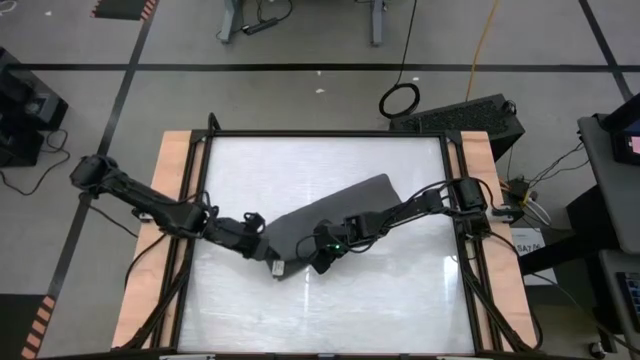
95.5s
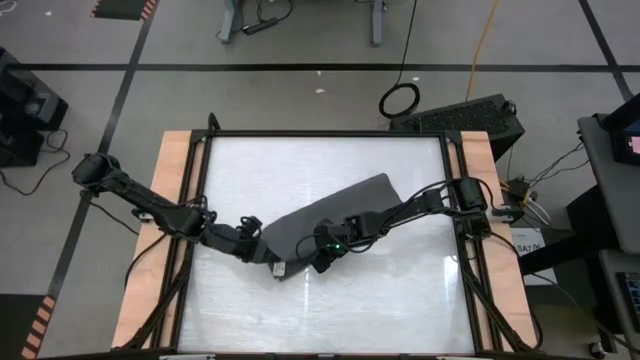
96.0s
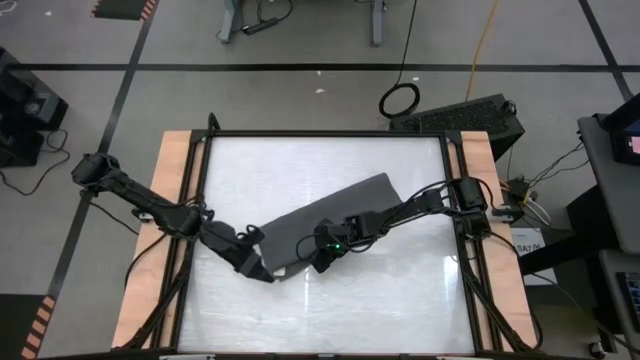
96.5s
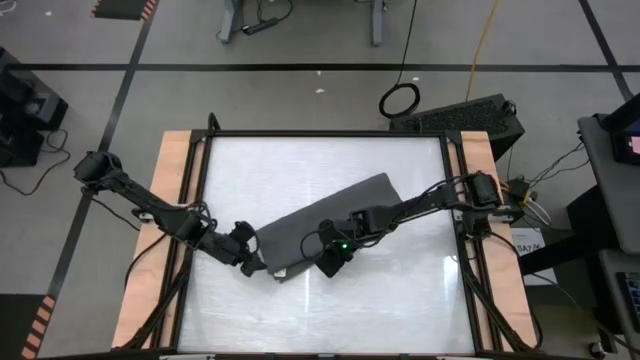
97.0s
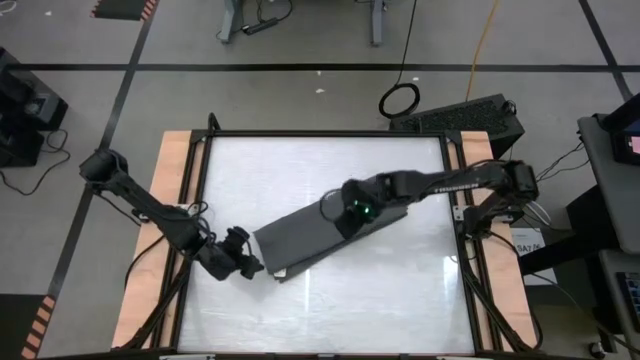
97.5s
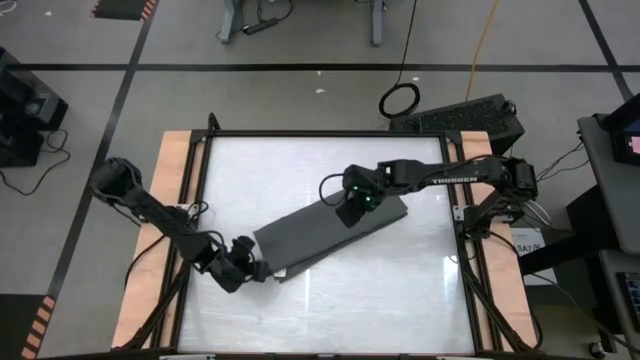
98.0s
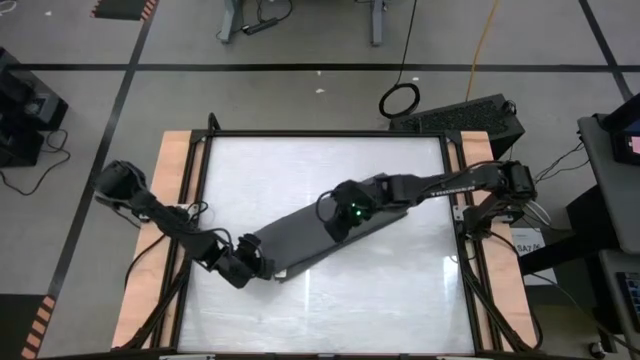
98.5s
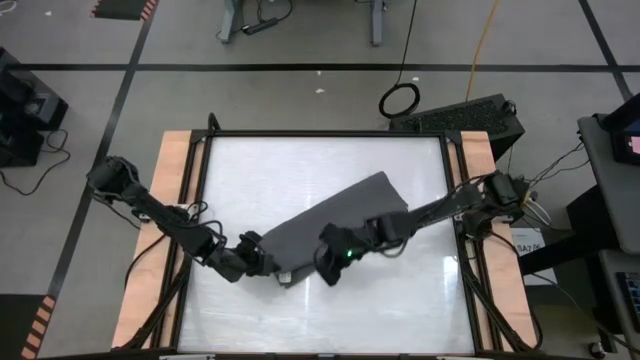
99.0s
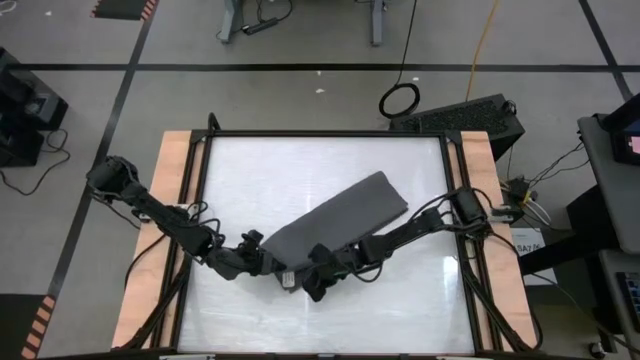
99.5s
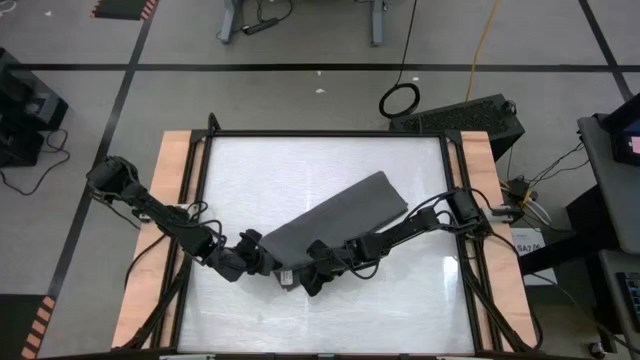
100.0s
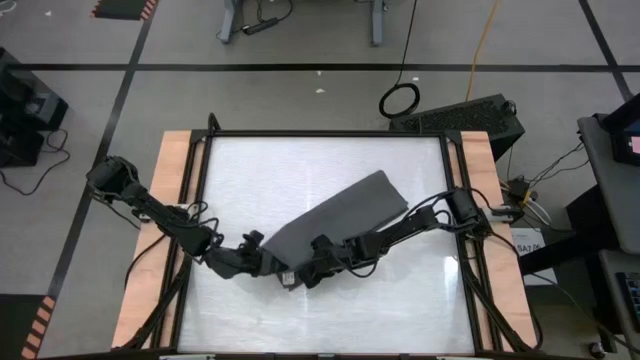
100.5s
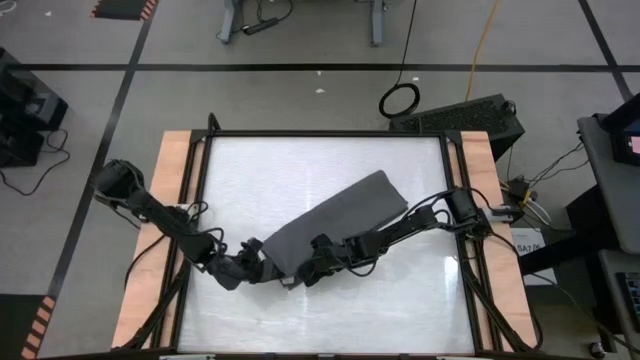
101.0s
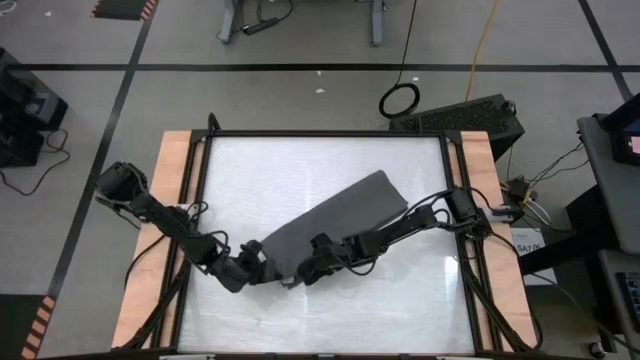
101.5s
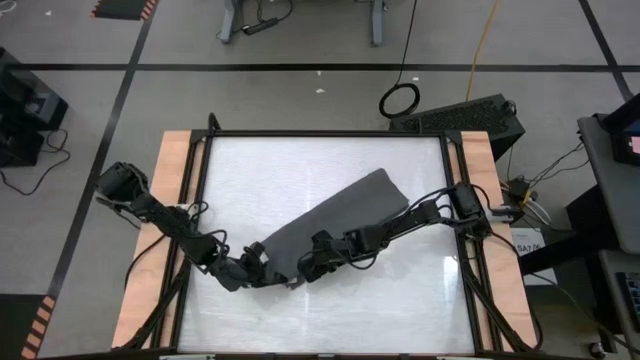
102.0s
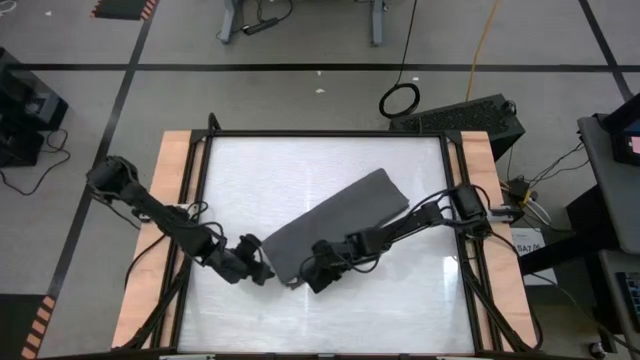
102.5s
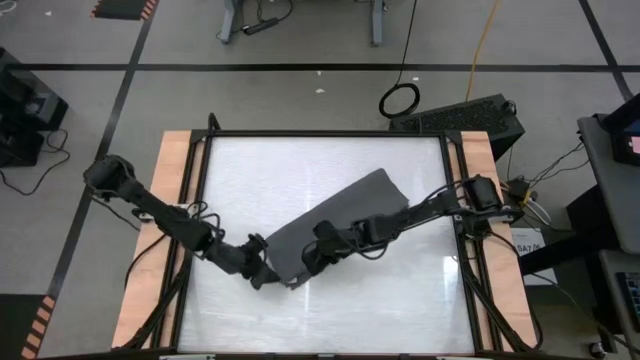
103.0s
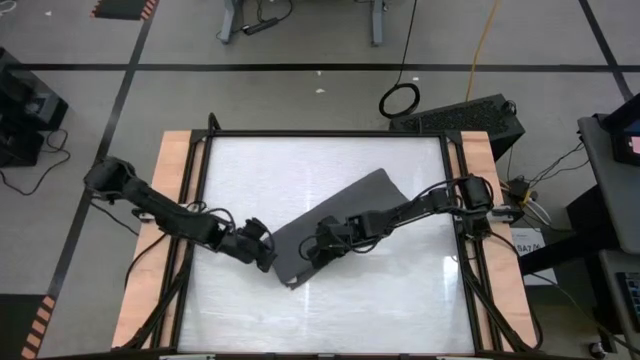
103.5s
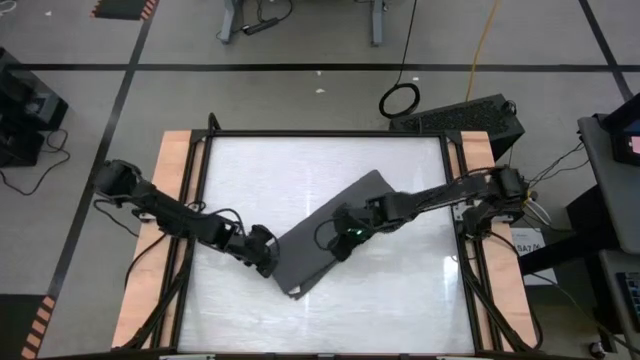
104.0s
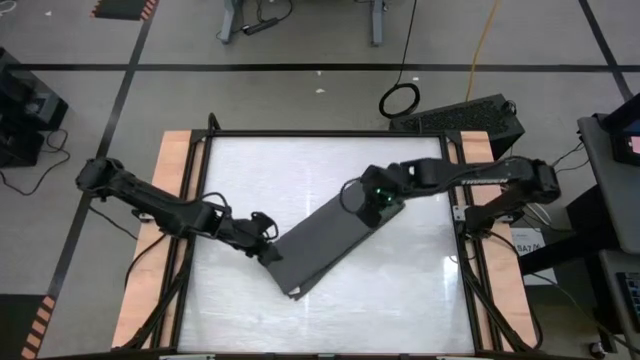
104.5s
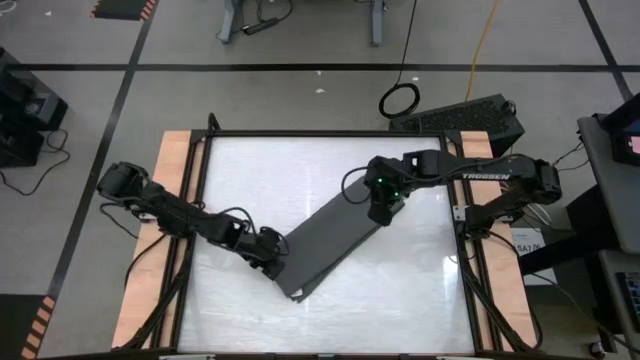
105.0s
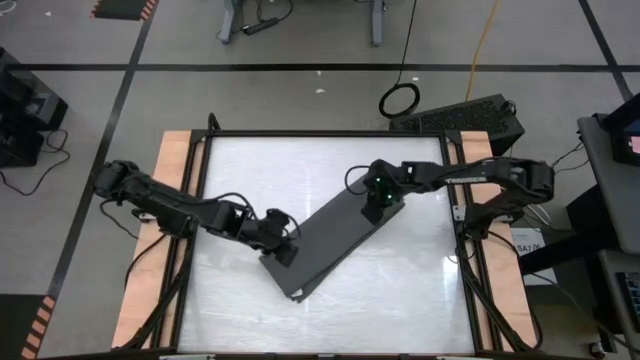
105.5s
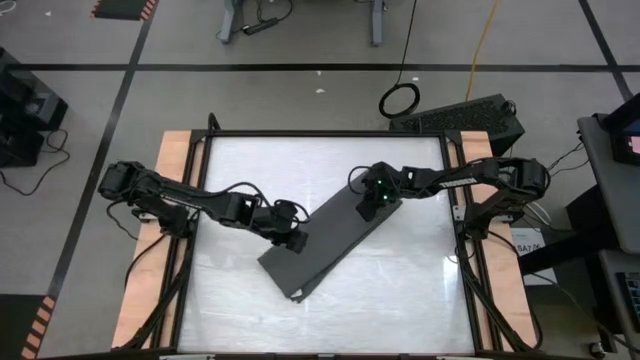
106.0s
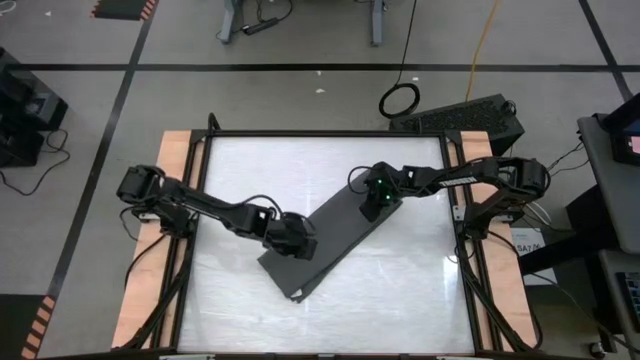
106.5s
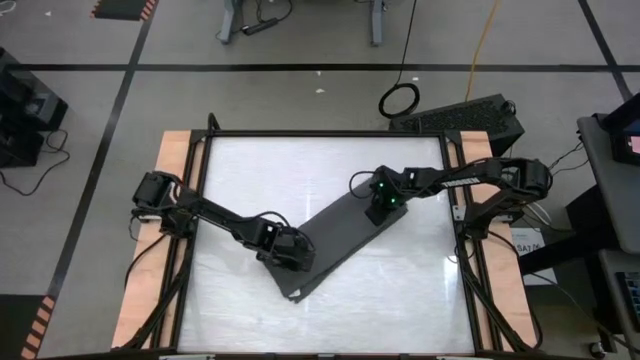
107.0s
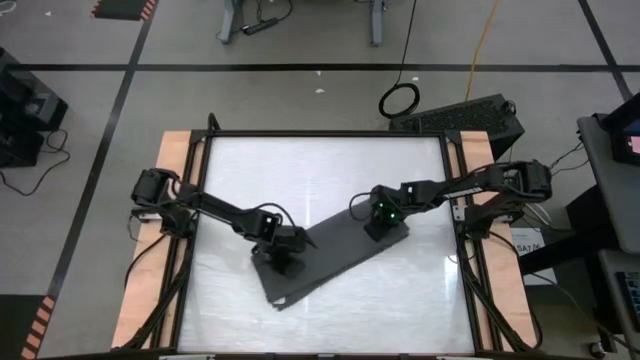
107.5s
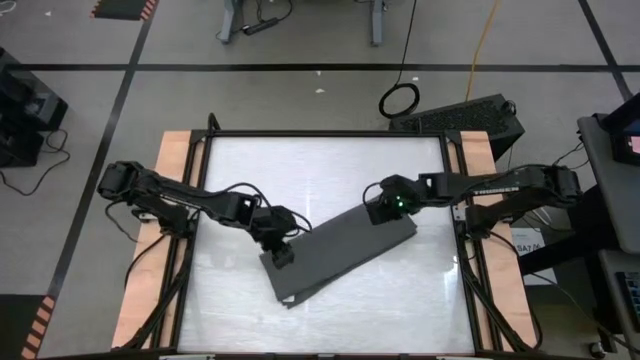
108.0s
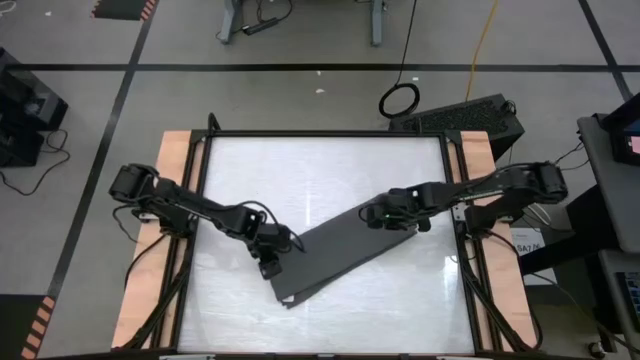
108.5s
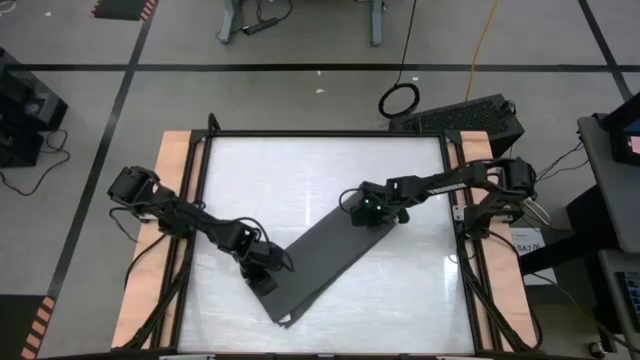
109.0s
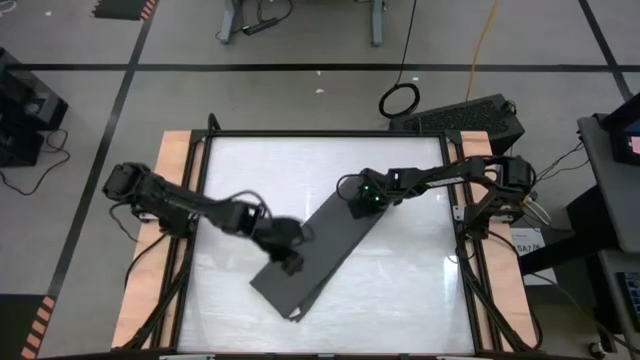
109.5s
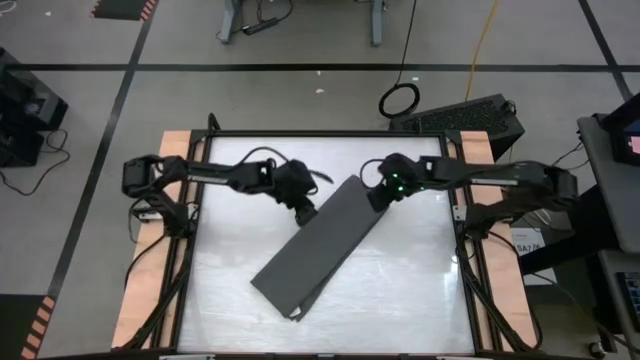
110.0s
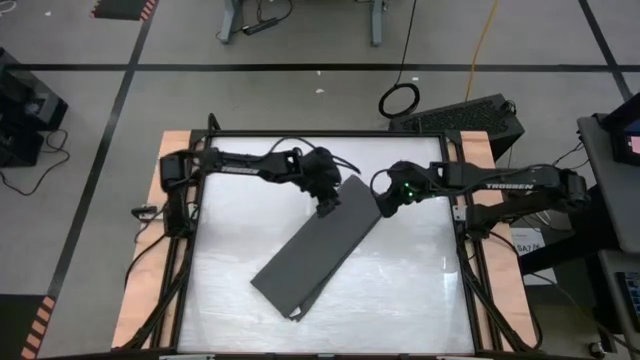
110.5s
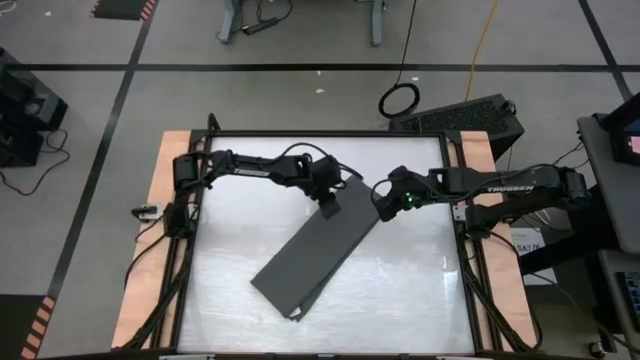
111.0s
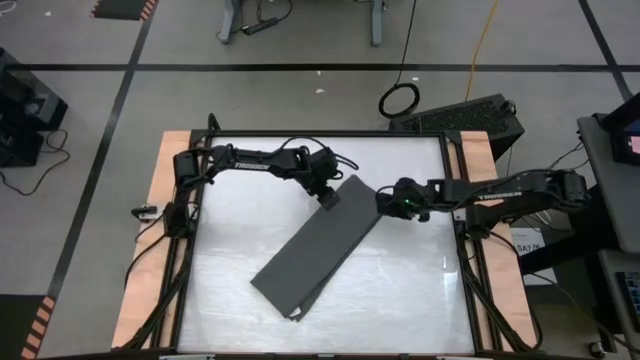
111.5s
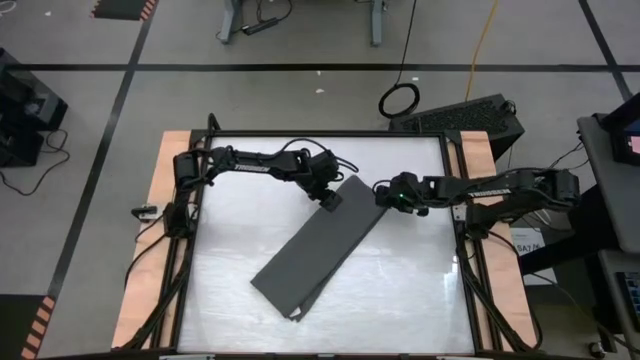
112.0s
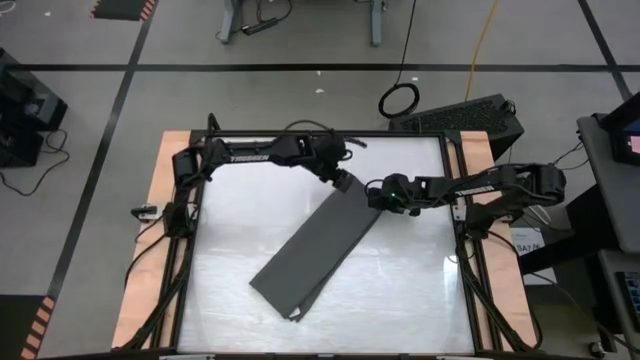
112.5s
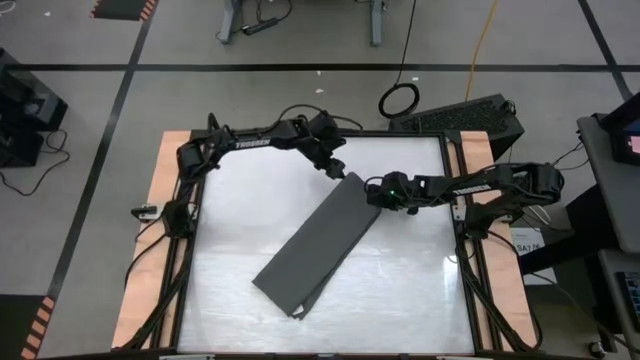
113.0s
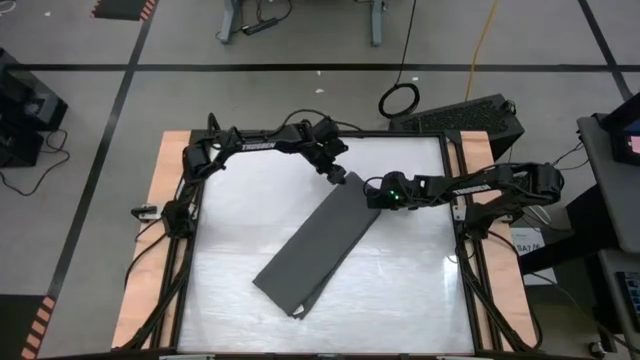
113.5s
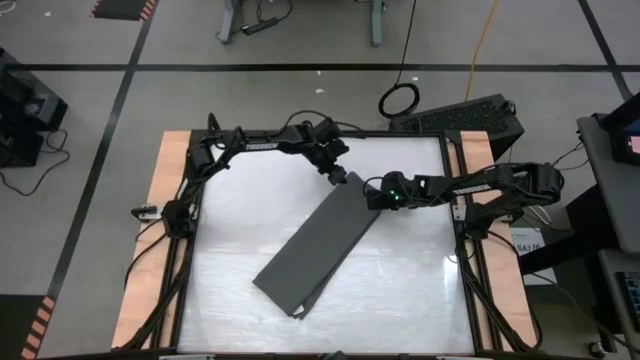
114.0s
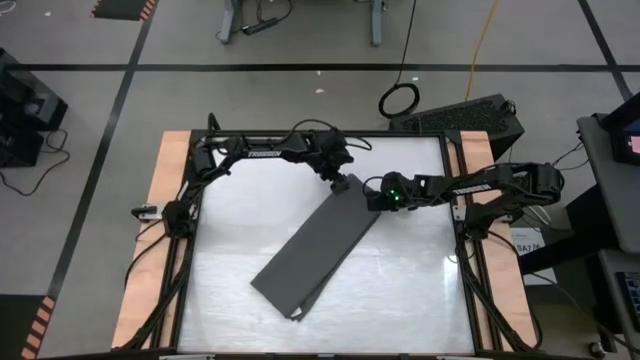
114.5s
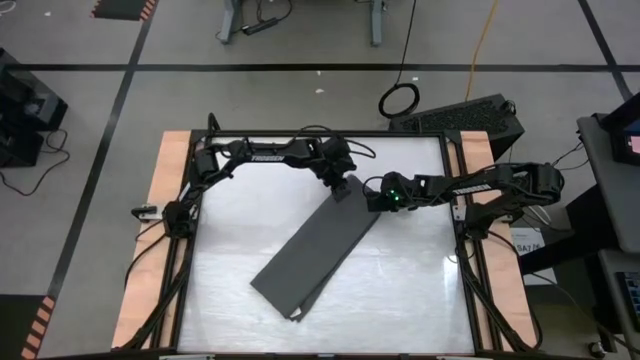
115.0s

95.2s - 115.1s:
Task: Roll towel into tight, uniform cylinder
Roll the gray towel
